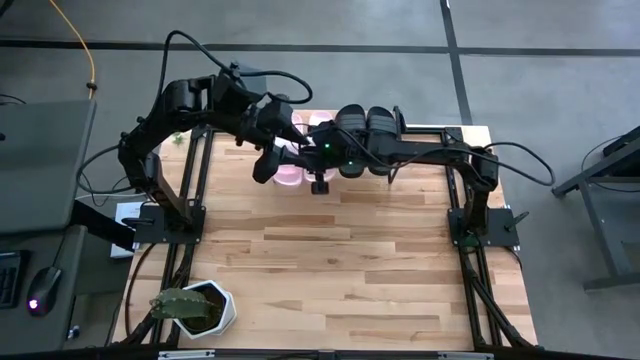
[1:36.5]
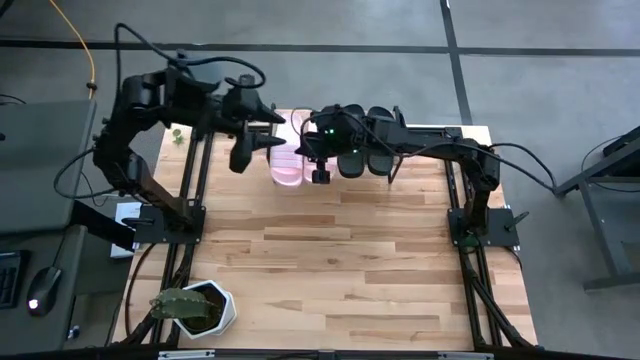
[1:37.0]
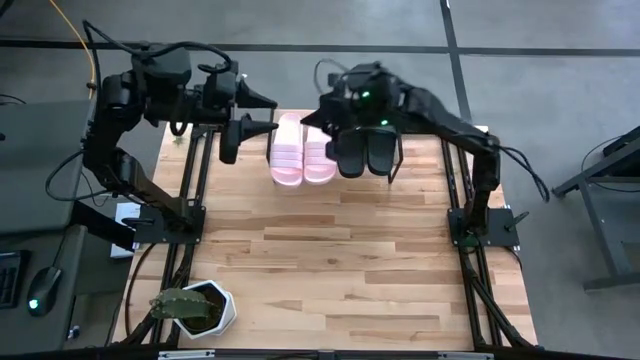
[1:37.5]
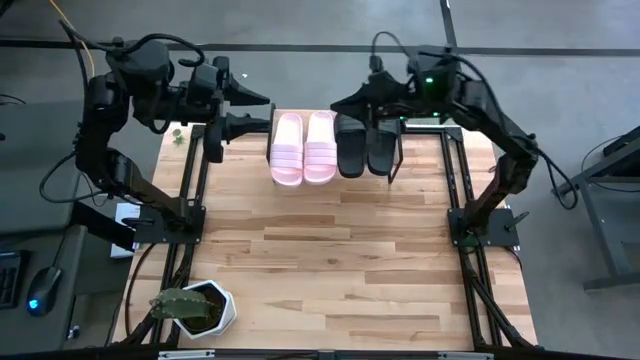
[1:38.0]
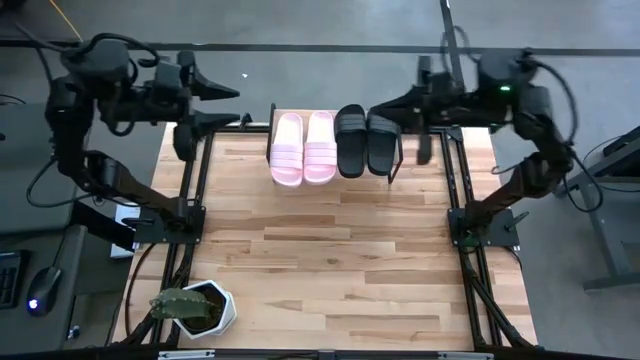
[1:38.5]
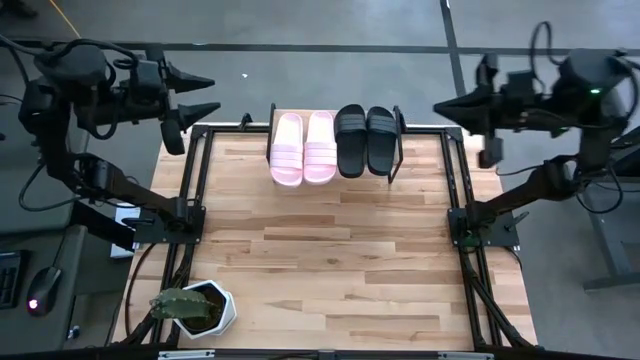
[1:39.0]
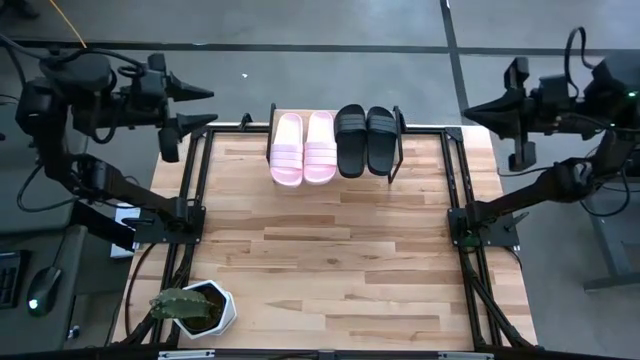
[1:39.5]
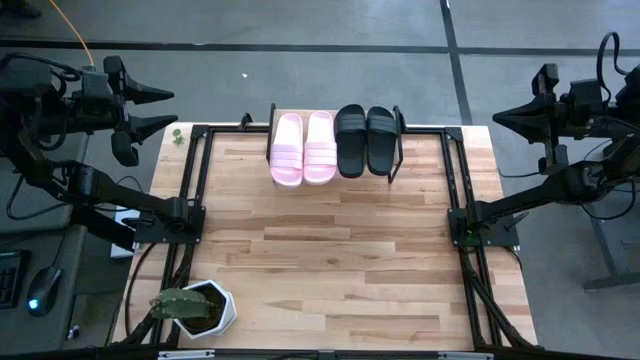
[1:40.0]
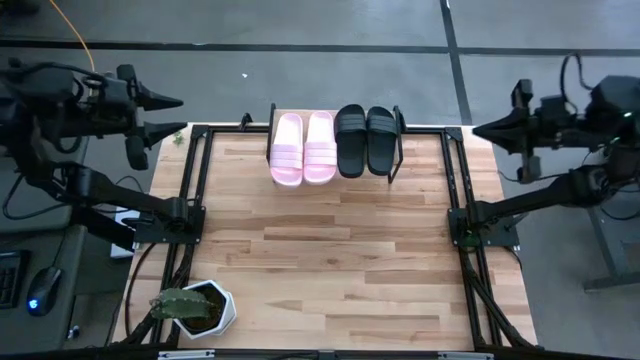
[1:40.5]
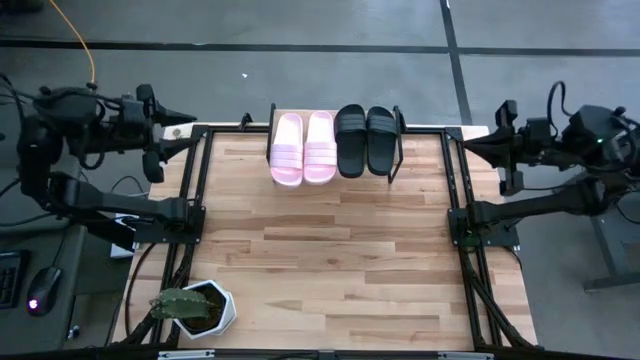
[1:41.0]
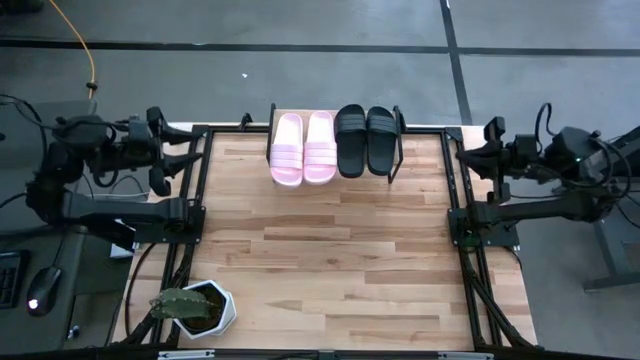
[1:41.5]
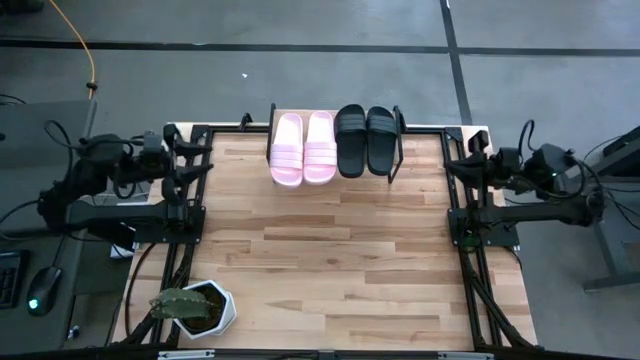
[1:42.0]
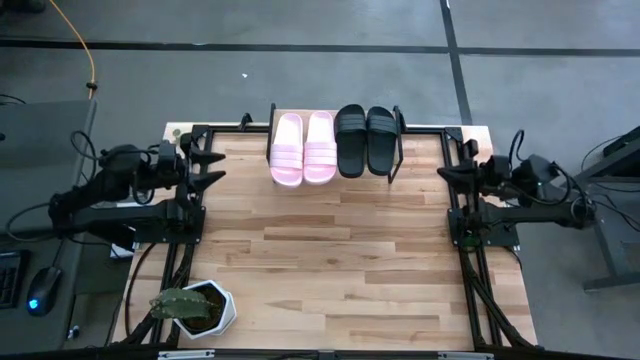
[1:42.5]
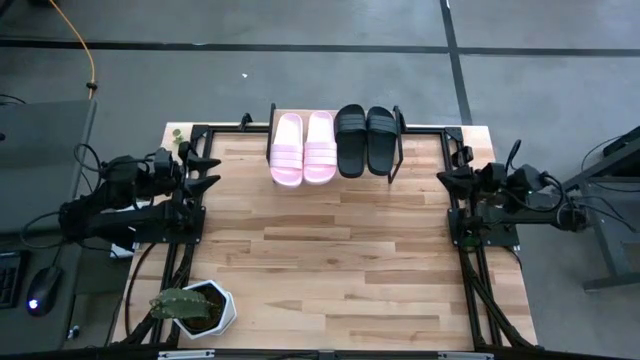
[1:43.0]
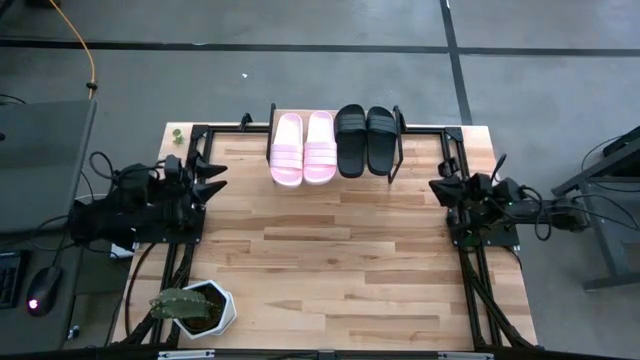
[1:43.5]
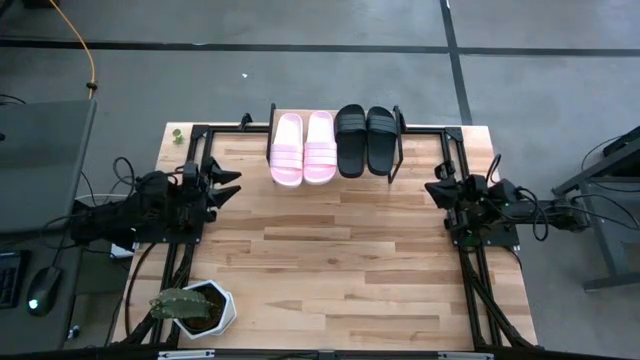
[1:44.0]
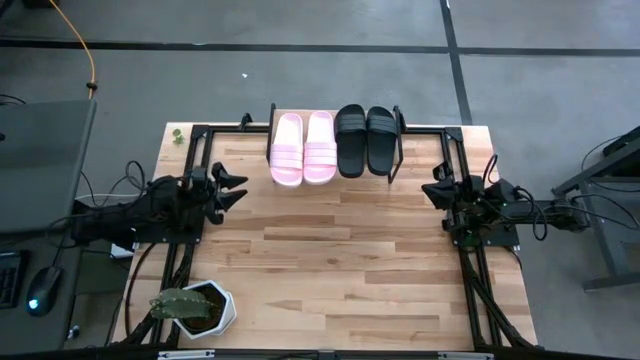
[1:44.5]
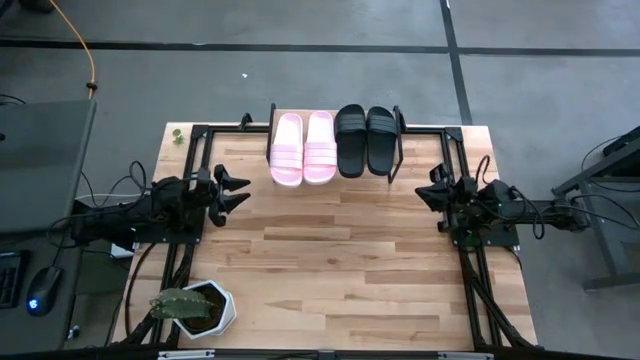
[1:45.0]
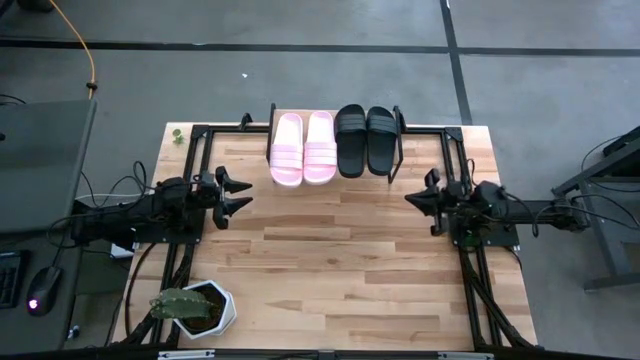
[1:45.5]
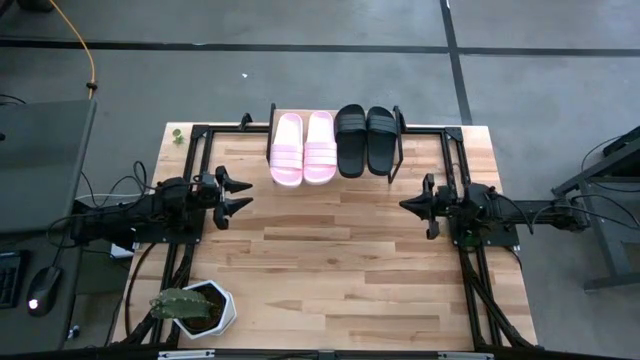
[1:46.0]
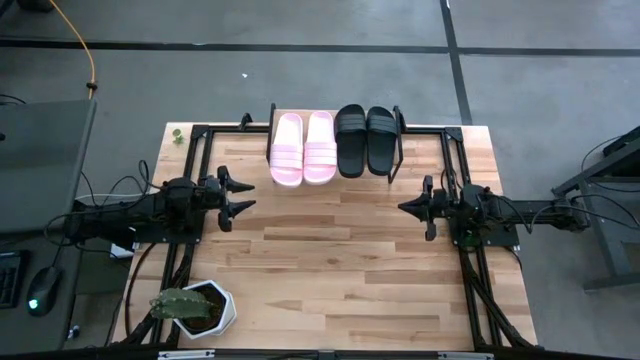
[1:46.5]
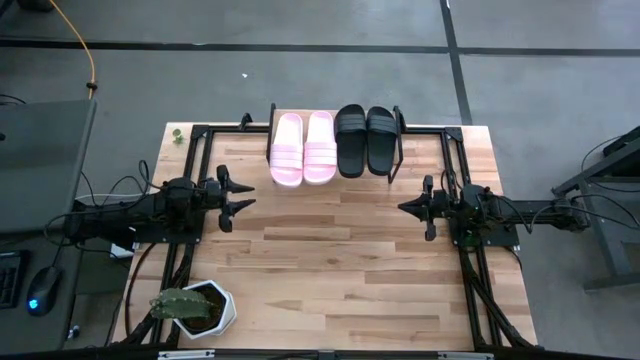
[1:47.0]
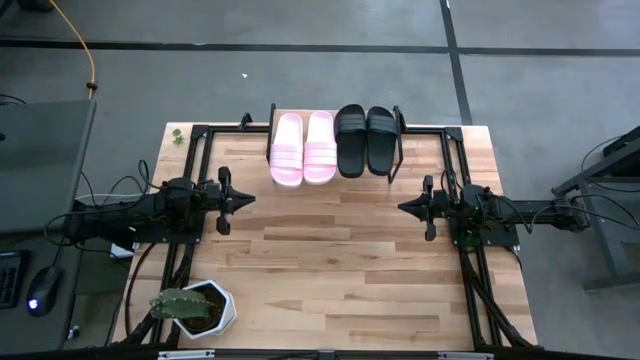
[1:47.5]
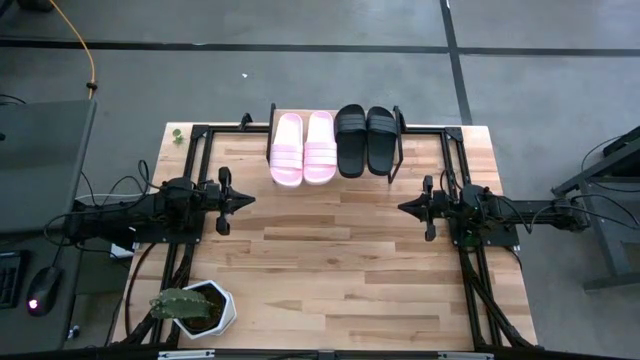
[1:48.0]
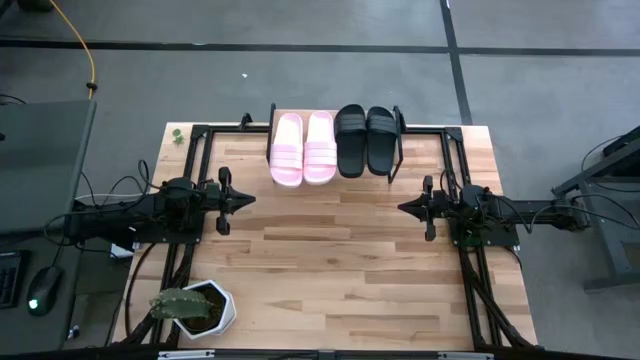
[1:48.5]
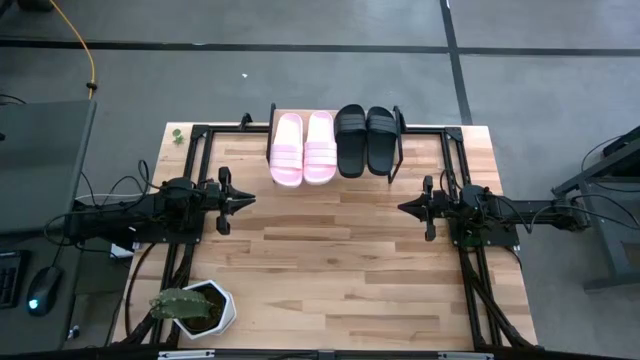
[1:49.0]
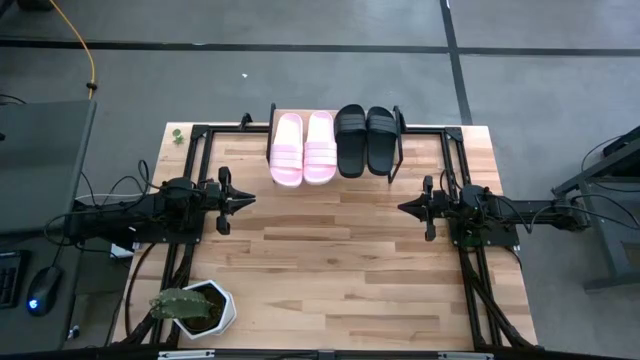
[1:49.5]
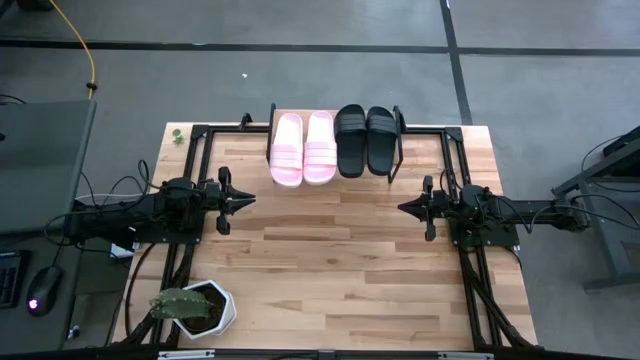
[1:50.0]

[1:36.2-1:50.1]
Task: Pick and place slides into the shelf
Return to Home Position

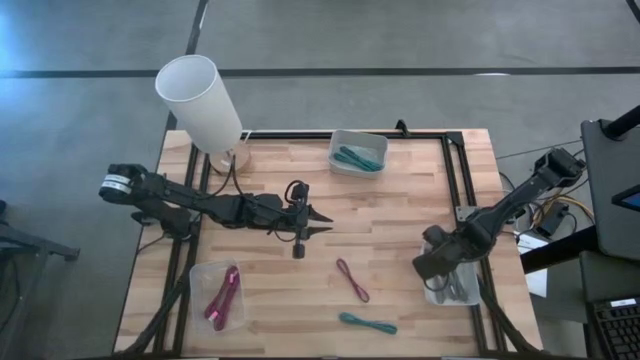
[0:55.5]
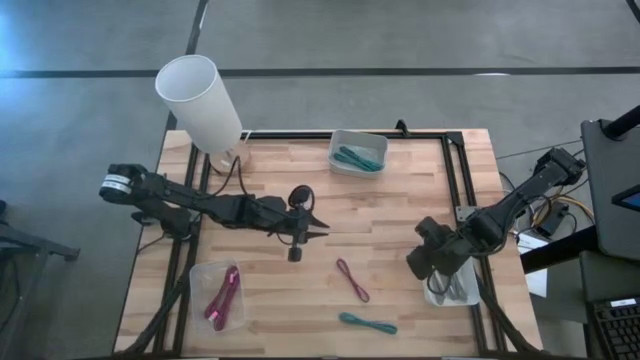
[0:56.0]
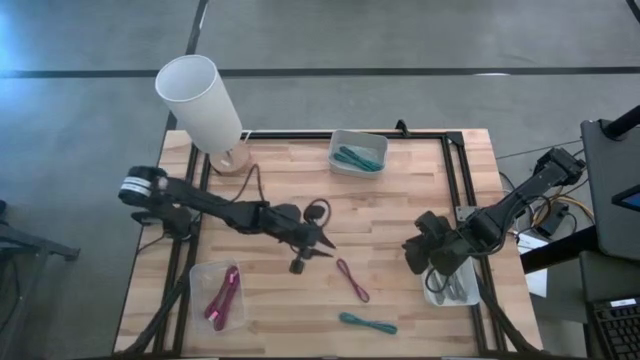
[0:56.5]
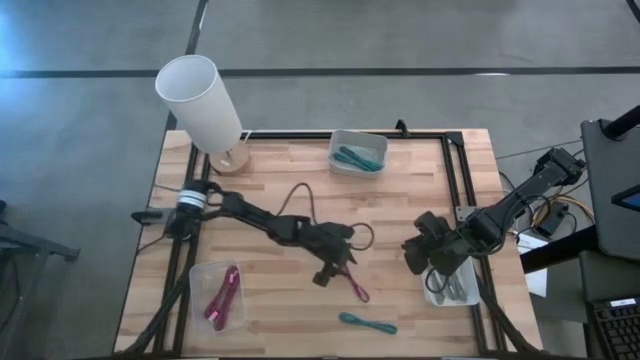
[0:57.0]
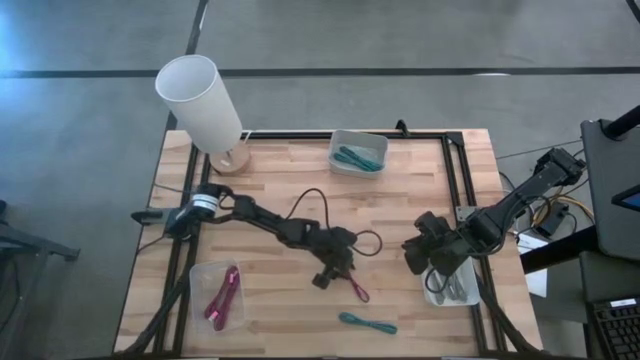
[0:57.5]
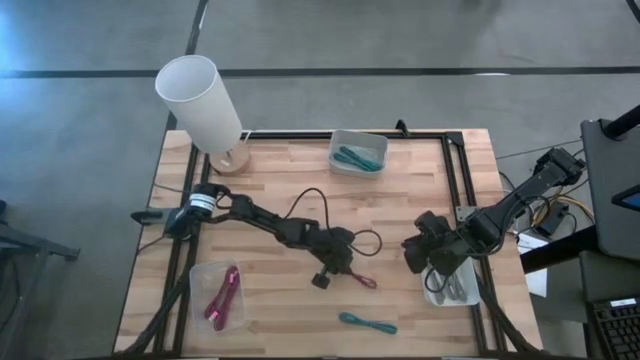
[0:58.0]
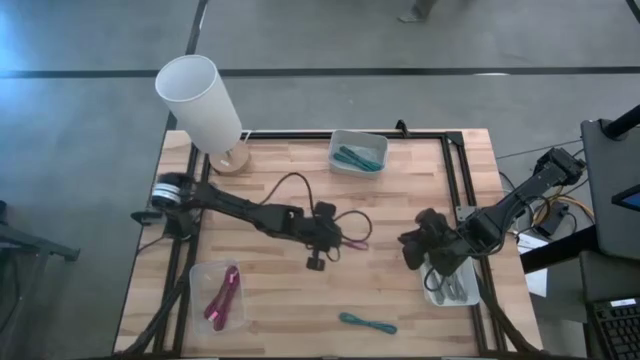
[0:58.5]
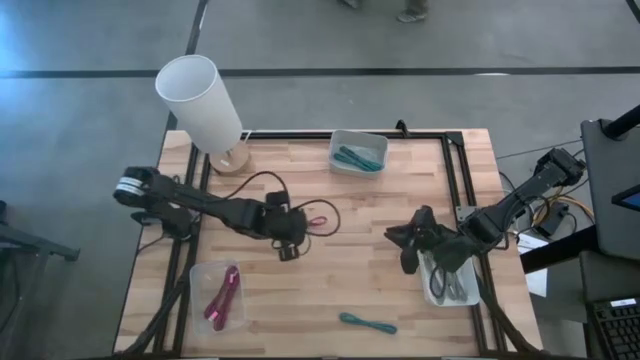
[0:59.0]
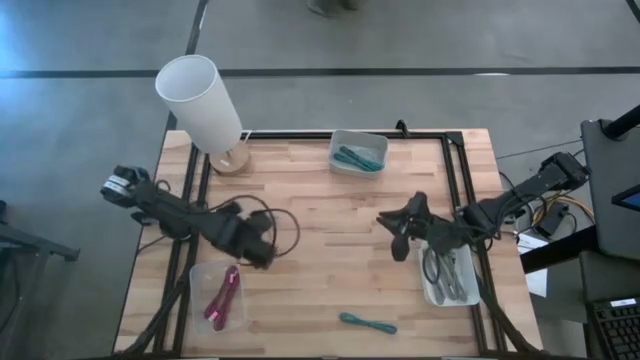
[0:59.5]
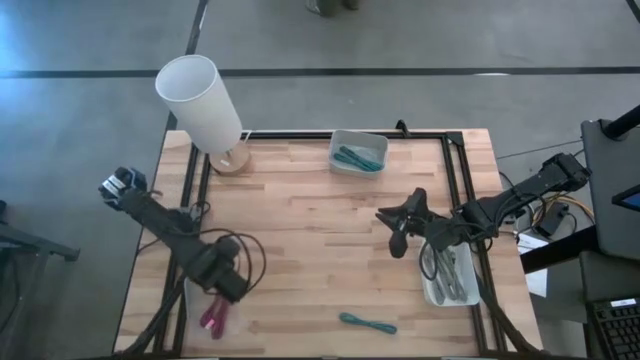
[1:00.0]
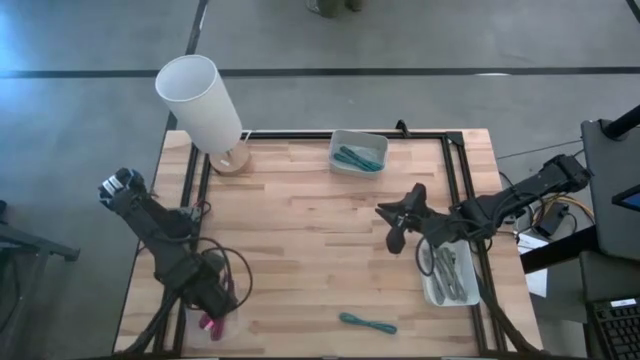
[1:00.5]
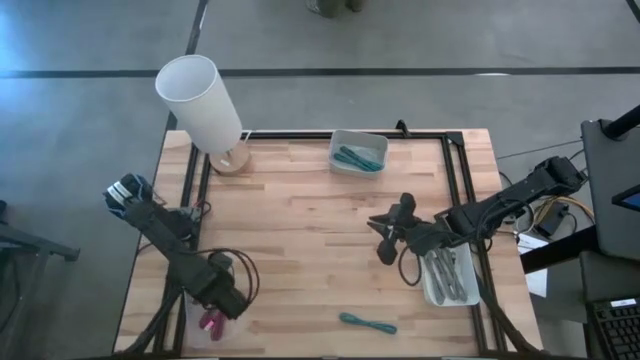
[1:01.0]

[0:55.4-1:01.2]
Task: Pick & Place USB Port
Put the pink striped charger cable into the transparent bin

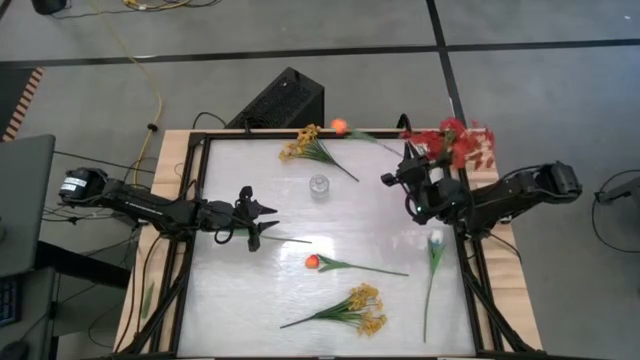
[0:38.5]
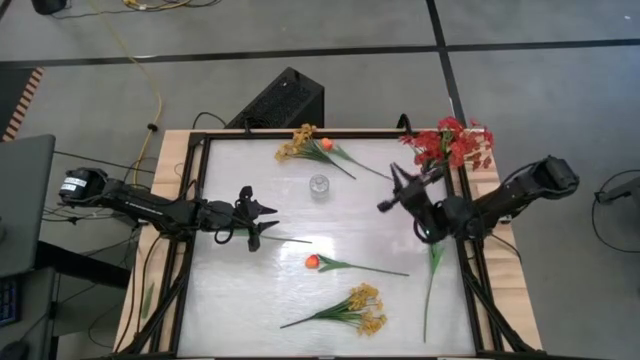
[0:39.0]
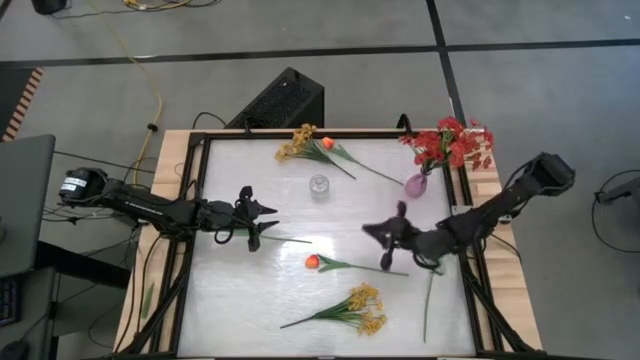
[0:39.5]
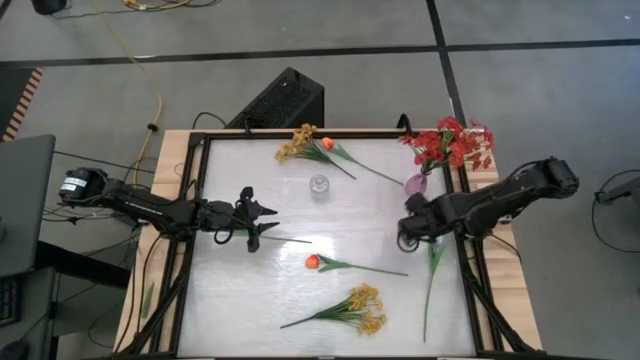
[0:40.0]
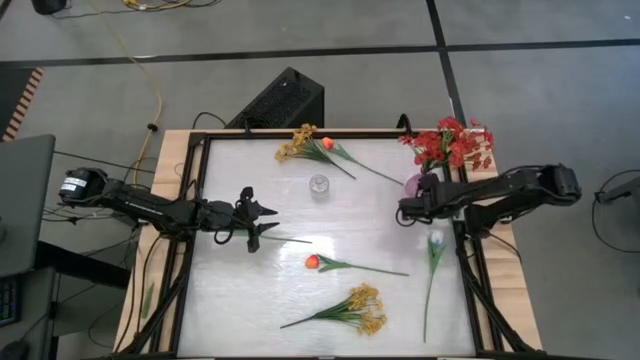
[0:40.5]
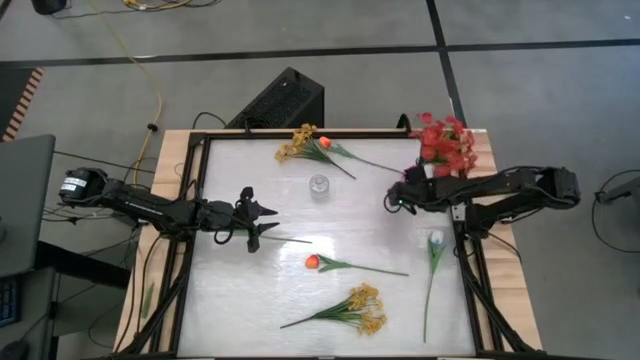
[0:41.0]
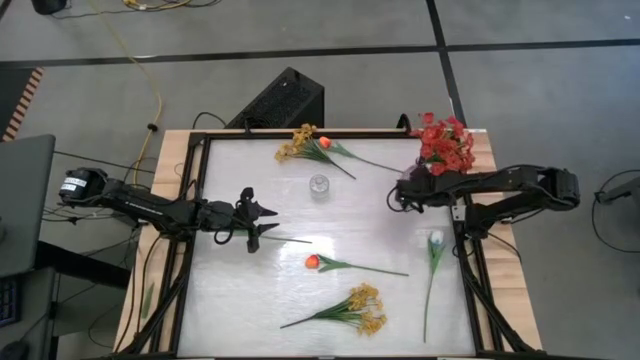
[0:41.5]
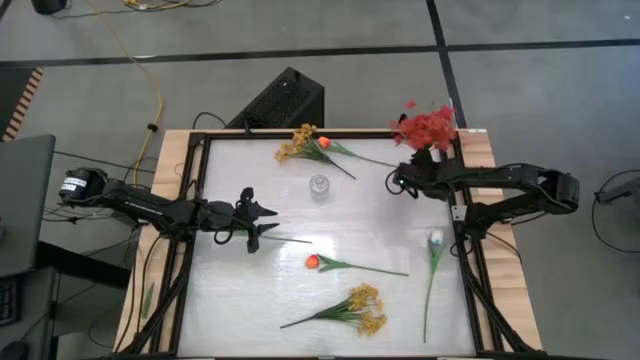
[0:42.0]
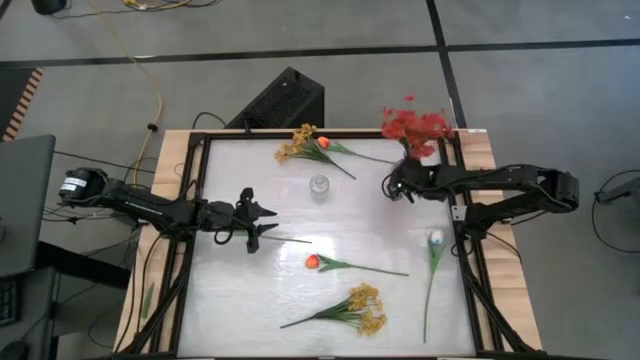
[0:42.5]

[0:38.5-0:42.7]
Task: Sort flowers into vase by color
Adjust the pink flower vase
